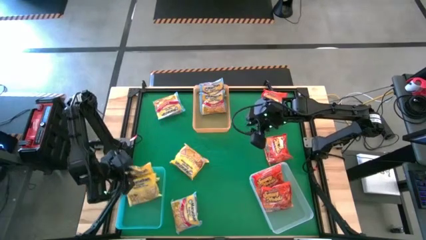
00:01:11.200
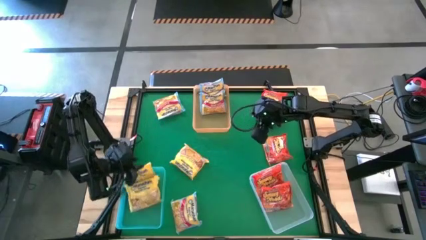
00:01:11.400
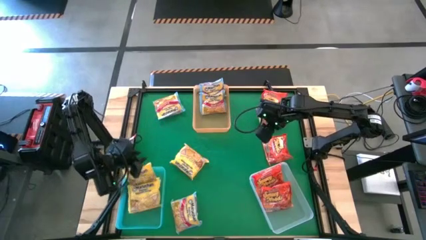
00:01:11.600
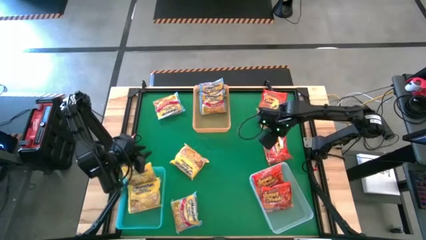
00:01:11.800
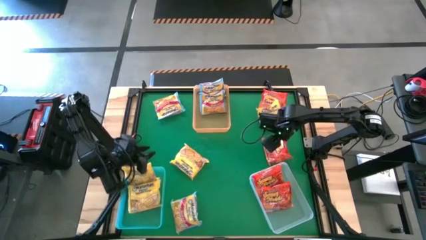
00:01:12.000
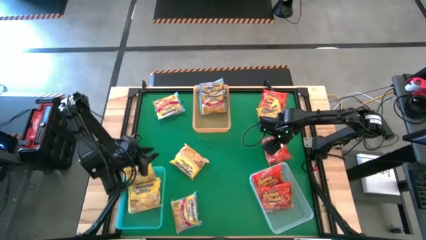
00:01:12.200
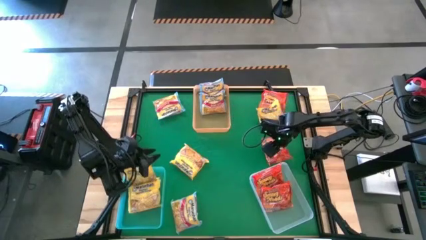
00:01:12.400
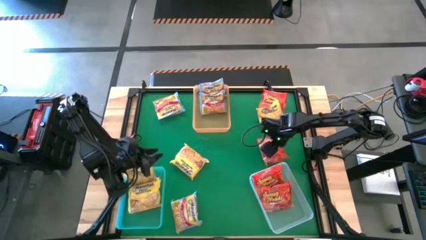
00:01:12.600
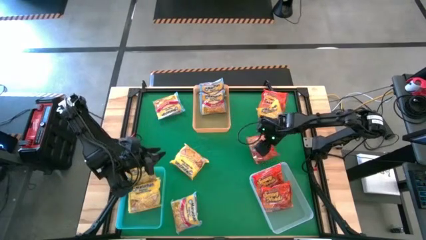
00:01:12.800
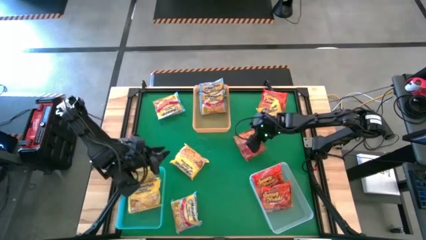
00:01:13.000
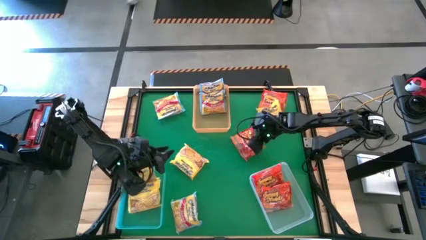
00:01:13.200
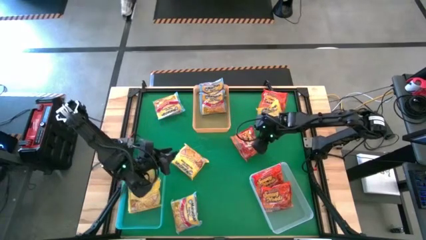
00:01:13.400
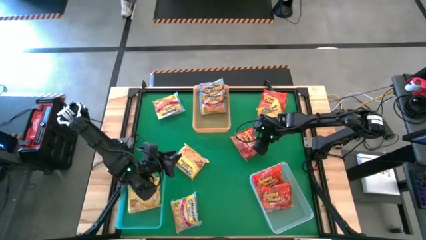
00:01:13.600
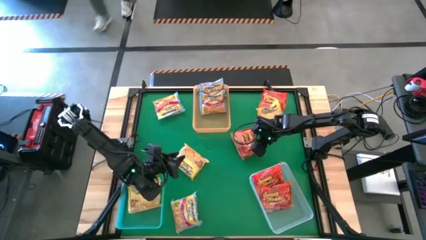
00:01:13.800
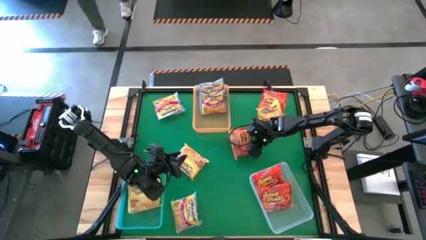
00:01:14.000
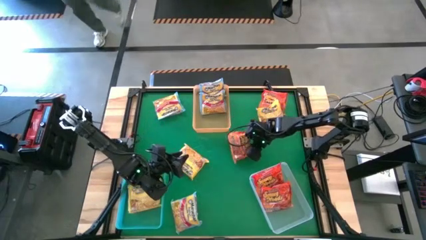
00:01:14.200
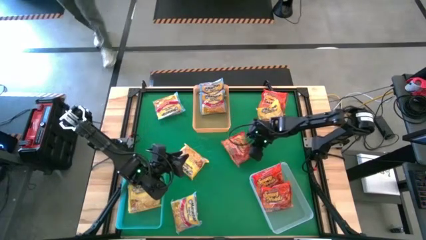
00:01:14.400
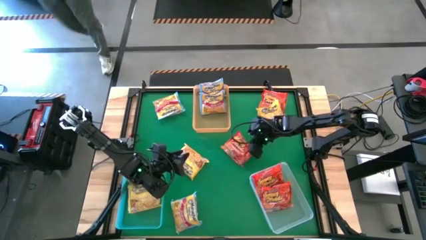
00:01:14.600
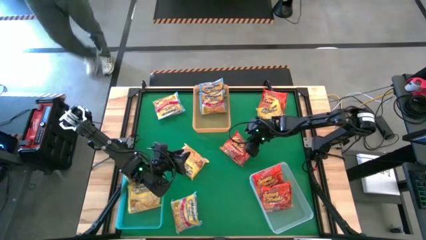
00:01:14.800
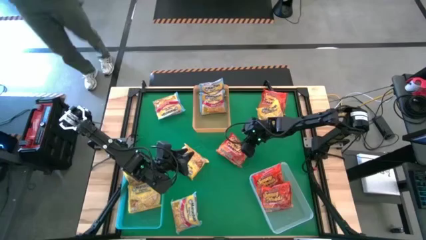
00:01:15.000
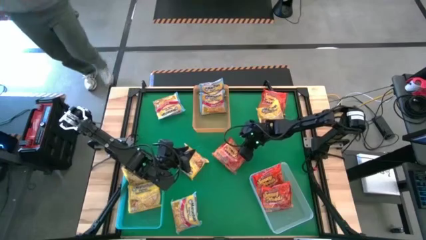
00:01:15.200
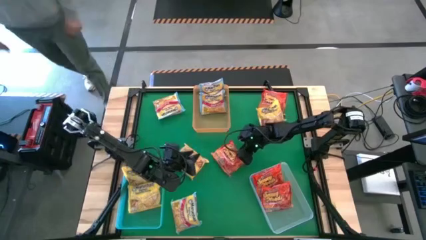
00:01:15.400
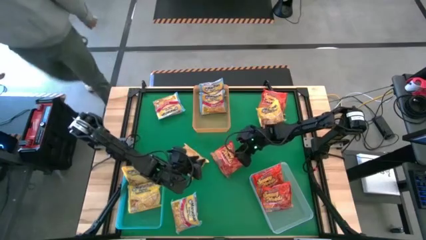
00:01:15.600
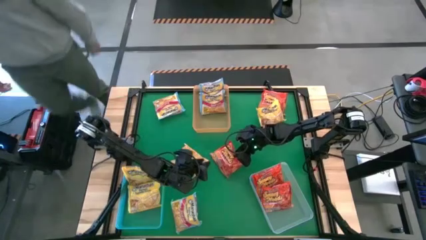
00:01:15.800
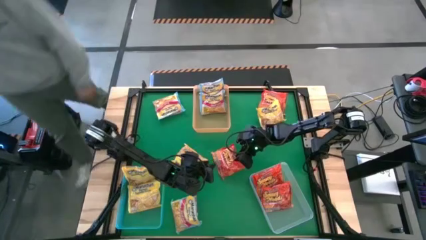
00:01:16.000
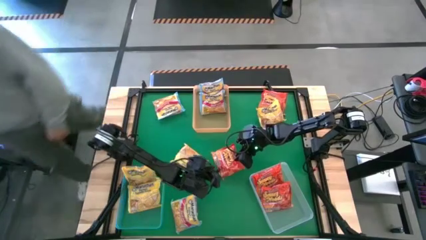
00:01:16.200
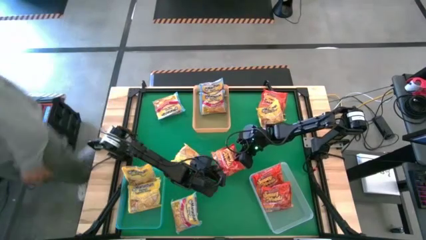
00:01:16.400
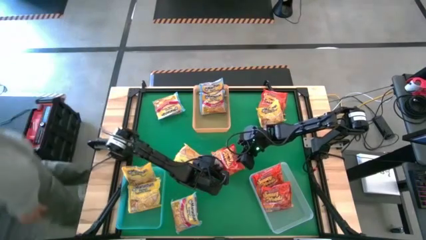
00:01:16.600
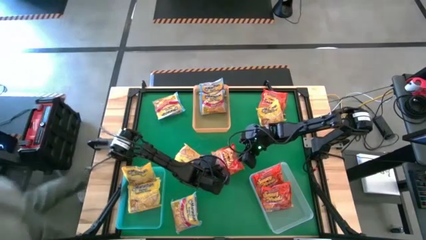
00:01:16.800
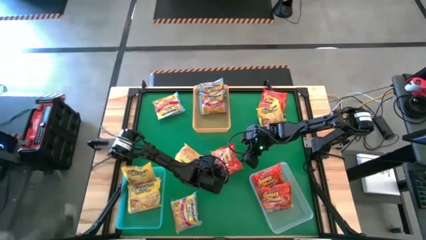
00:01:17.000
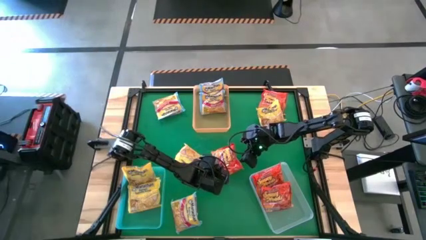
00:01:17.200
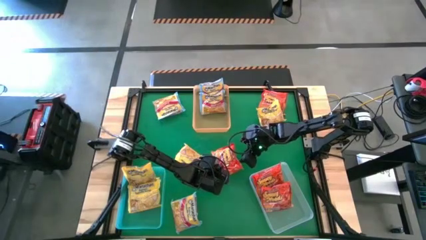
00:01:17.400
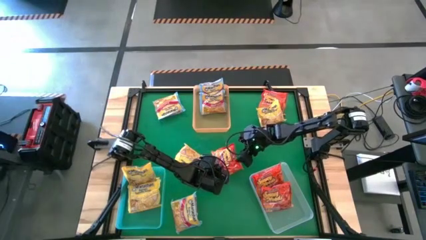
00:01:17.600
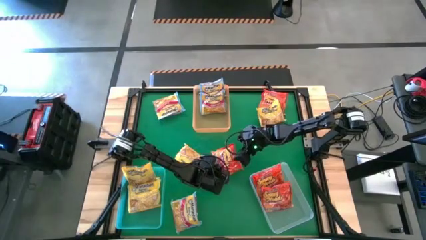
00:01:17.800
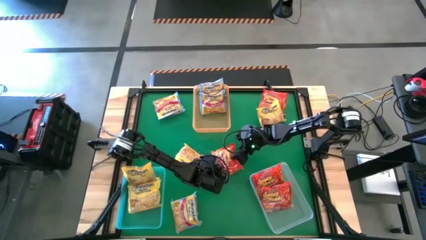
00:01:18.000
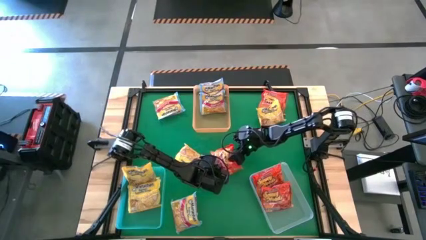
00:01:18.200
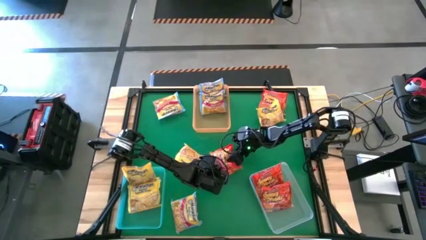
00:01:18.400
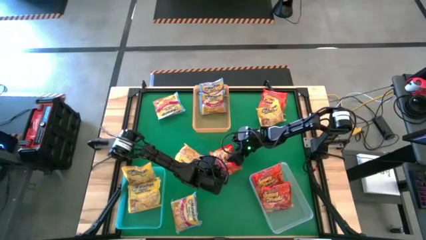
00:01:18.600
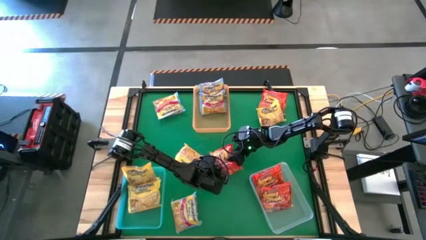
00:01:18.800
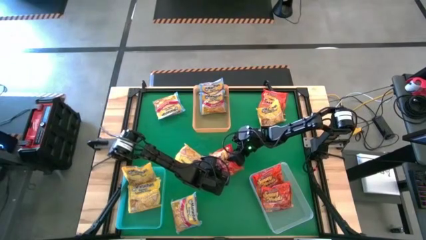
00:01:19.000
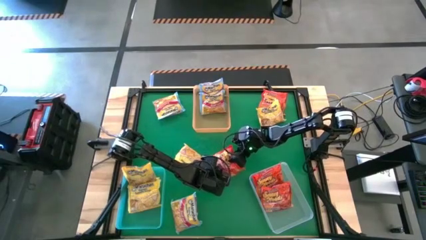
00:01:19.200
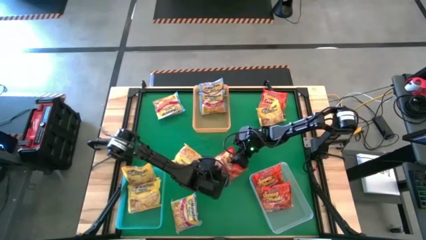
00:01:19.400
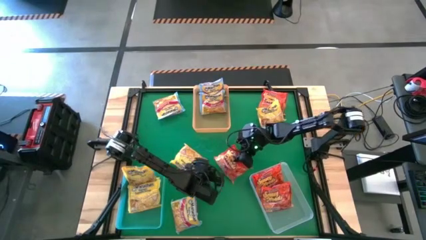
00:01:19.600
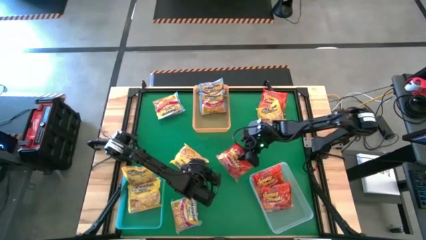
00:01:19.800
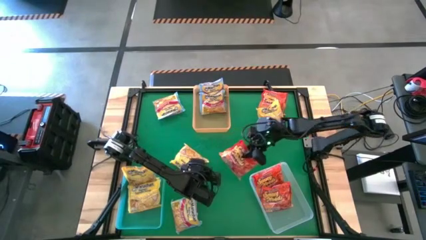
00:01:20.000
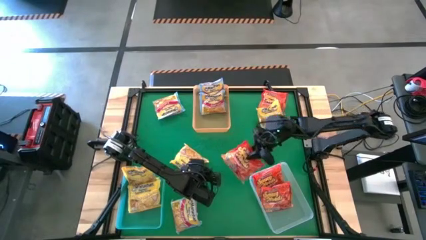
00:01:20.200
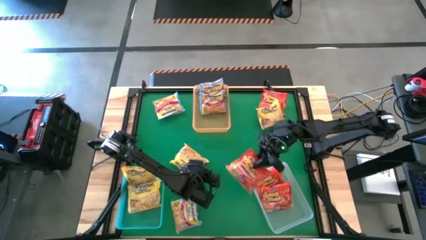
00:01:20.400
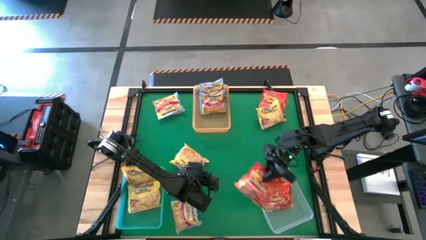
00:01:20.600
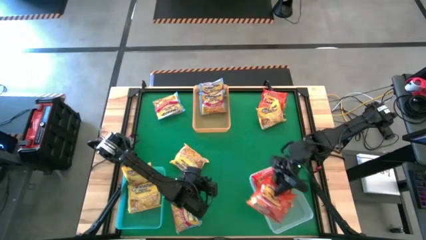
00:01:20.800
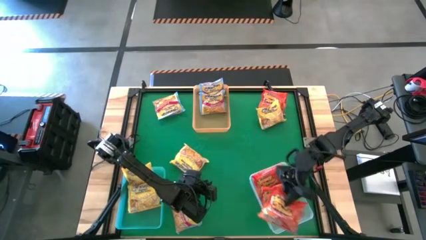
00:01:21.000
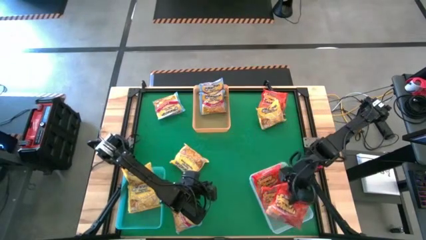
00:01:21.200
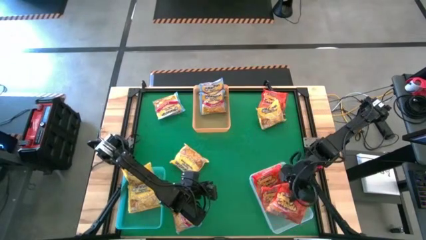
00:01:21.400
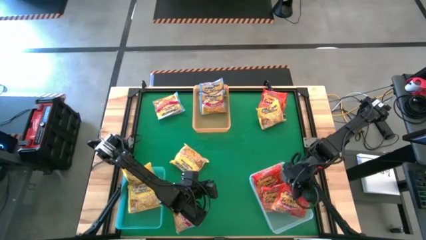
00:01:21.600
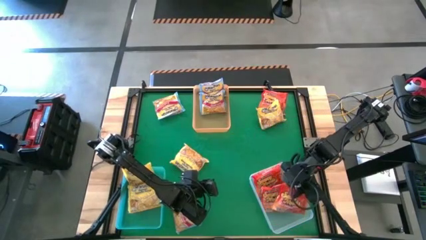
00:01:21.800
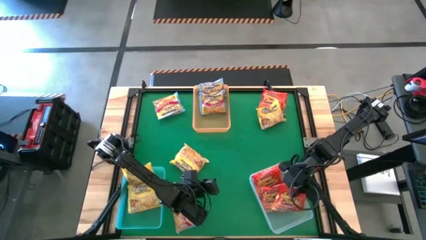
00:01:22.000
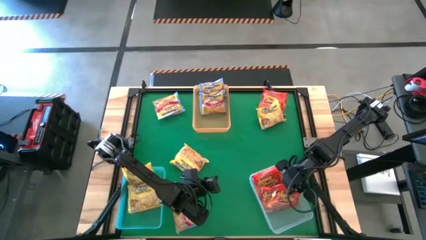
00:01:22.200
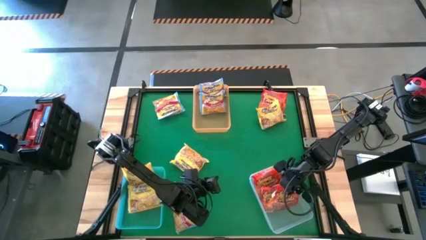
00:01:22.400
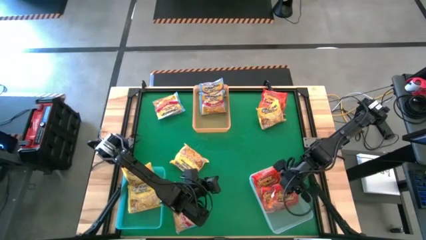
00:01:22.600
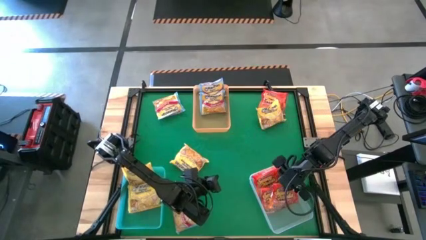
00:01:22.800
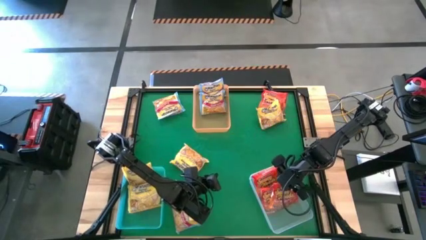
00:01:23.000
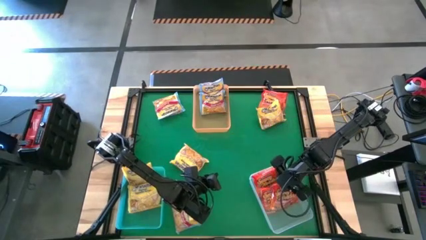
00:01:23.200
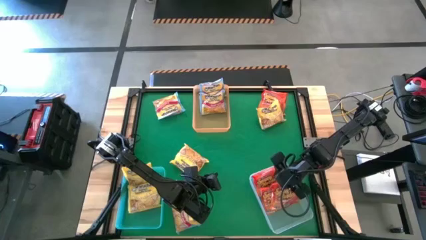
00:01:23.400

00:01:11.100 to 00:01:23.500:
Task: Sort Maruchan noodles
Put the orange noodle pack into the transparent bin

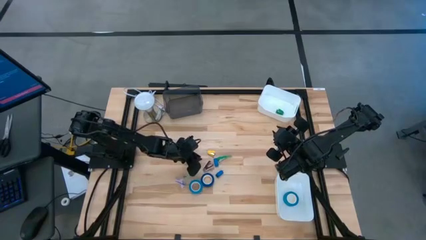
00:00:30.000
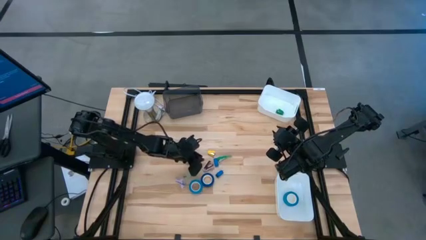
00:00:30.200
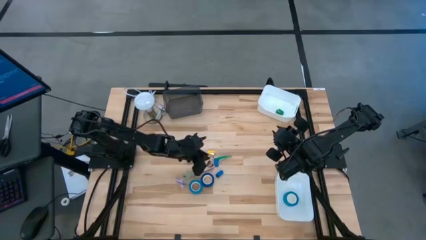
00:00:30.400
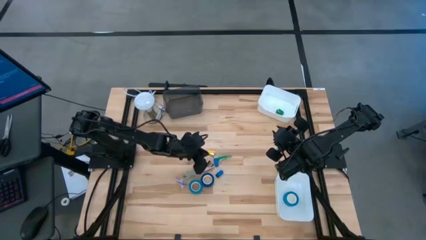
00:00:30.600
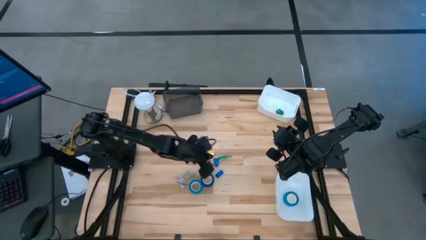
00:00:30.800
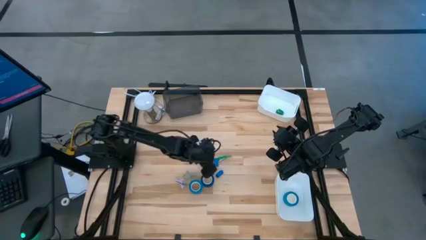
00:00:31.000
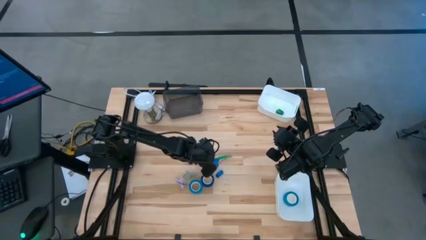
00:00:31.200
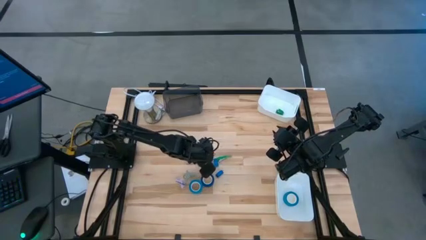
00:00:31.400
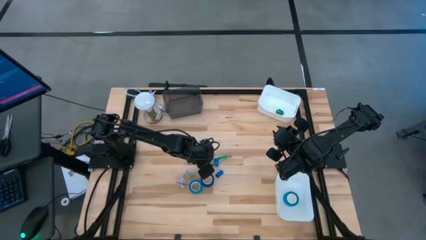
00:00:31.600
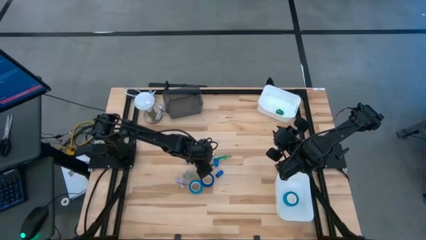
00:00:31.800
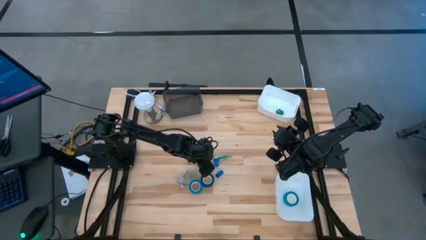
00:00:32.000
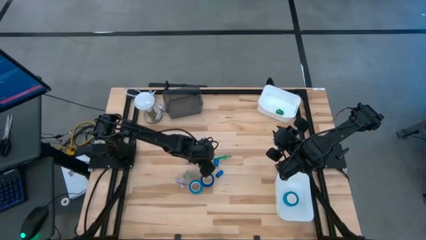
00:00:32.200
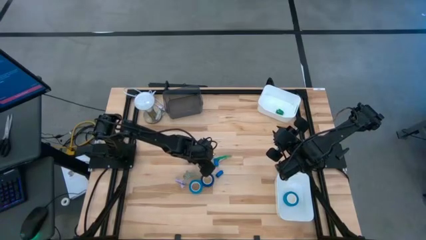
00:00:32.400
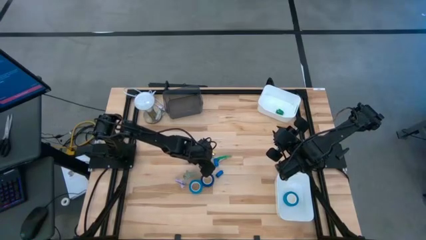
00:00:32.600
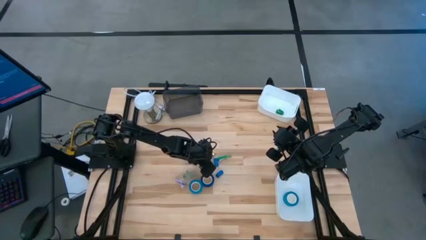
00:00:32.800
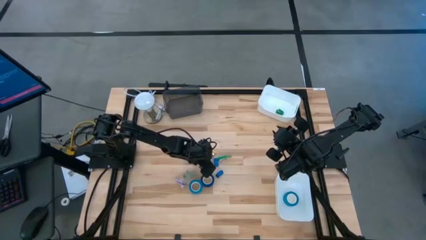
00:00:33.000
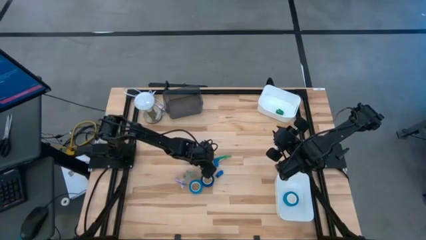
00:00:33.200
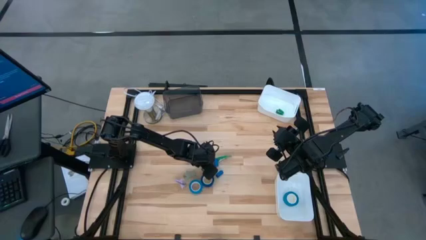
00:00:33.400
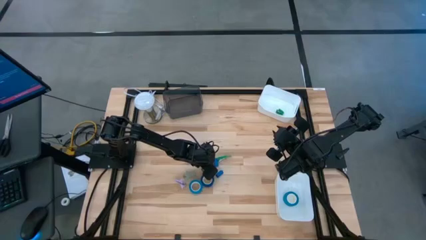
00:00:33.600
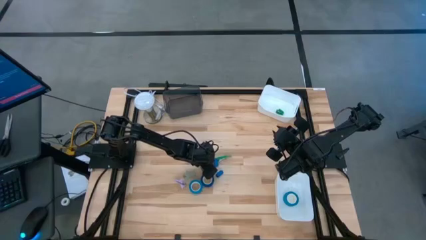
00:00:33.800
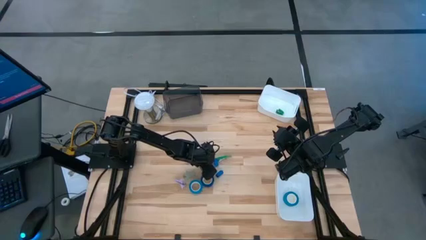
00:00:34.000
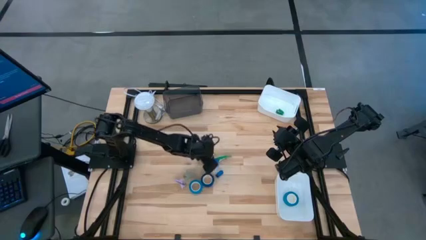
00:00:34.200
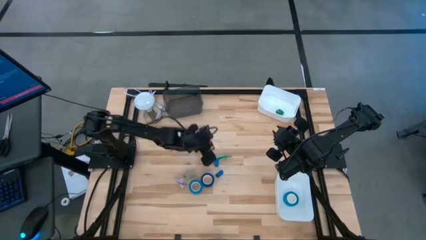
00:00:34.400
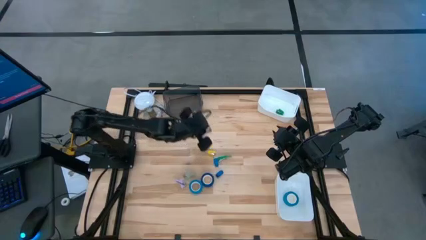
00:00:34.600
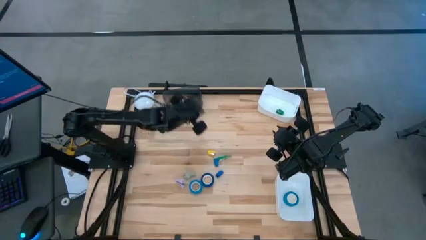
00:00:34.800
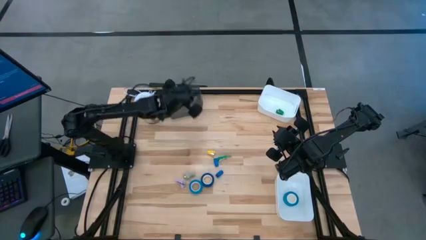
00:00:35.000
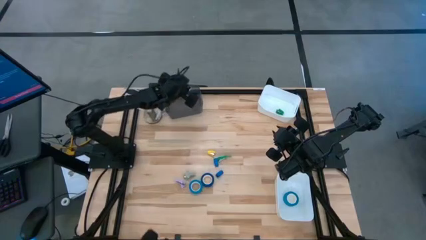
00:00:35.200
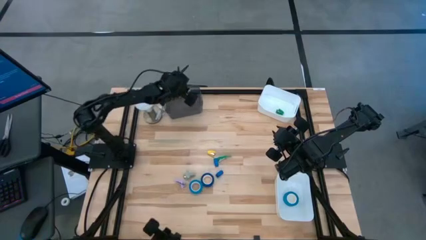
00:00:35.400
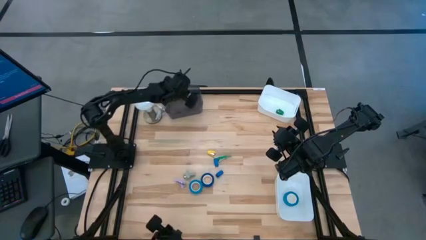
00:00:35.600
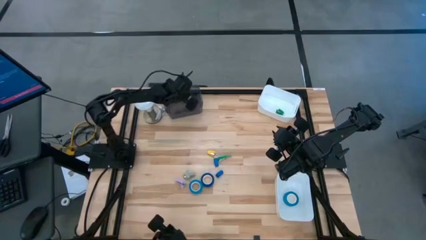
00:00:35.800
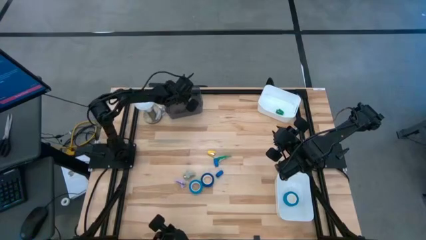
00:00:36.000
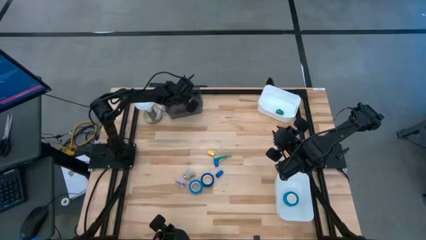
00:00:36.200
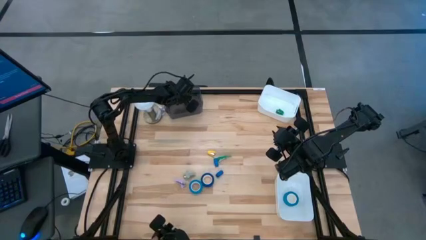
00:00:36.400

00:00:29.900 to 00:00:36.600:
Task: Pick and place Stapler, Stapler remover, tape
Put the pink staple remover into the black bin
